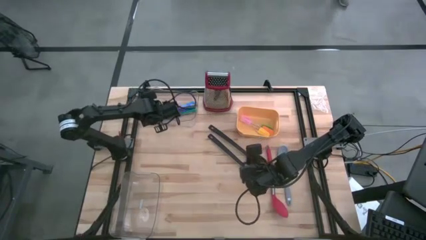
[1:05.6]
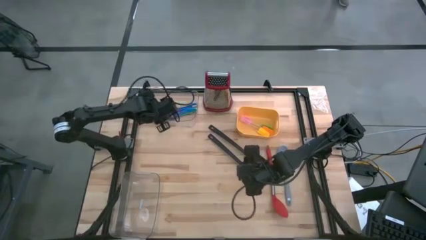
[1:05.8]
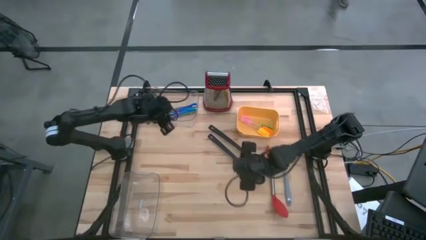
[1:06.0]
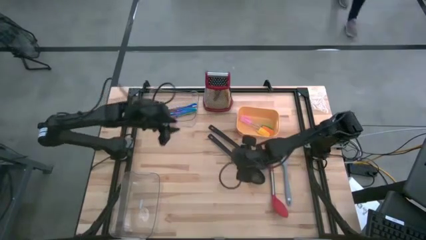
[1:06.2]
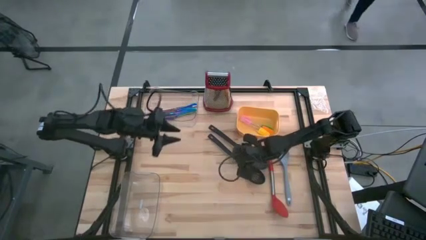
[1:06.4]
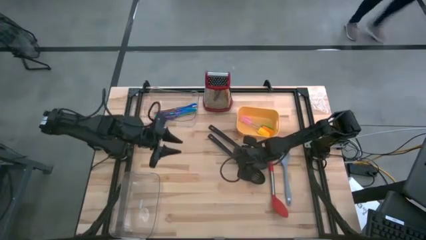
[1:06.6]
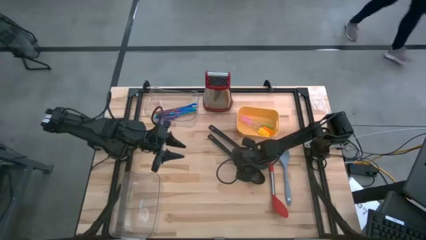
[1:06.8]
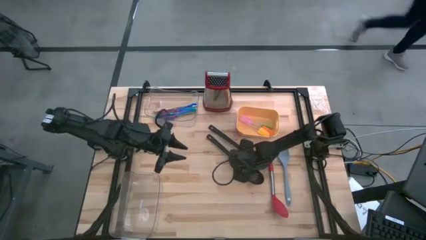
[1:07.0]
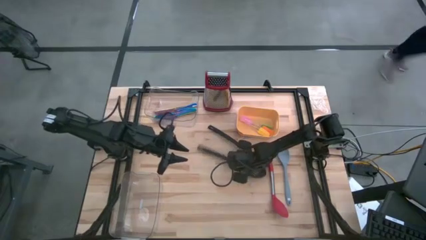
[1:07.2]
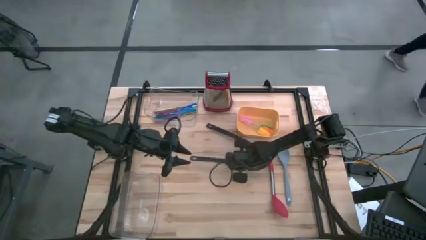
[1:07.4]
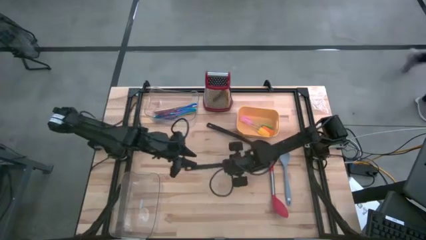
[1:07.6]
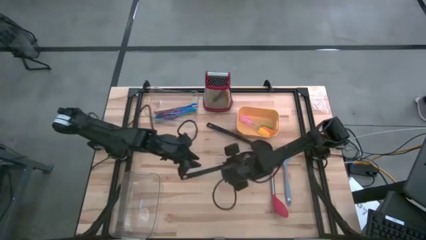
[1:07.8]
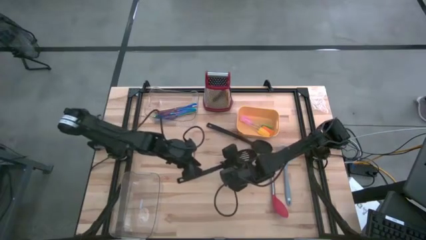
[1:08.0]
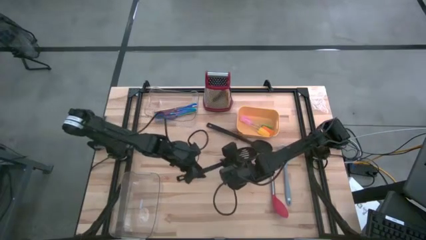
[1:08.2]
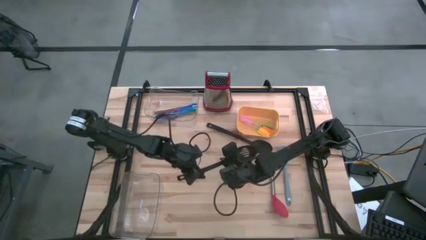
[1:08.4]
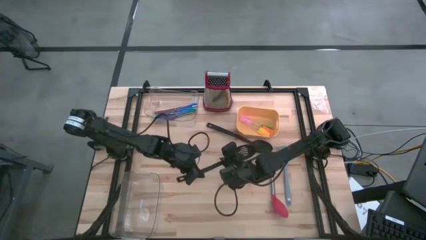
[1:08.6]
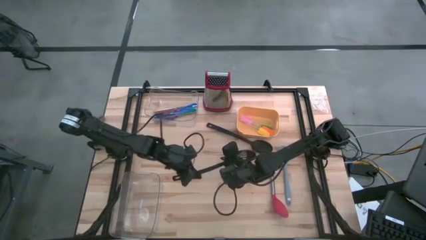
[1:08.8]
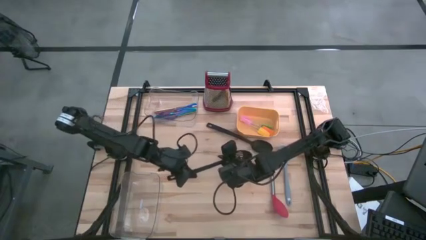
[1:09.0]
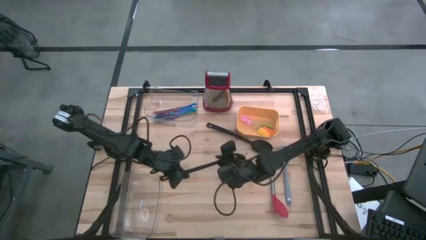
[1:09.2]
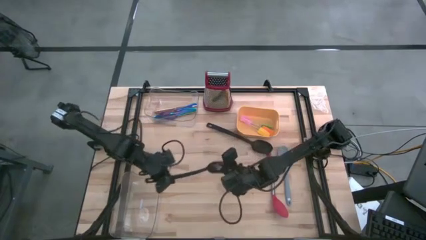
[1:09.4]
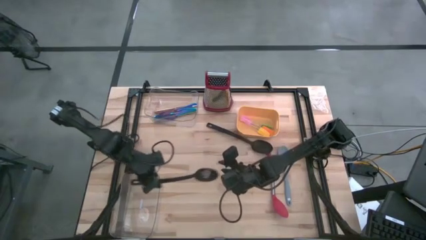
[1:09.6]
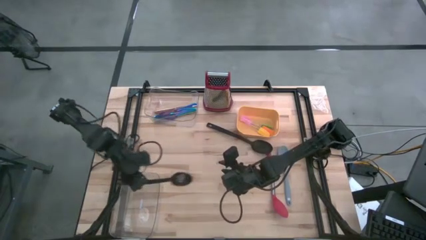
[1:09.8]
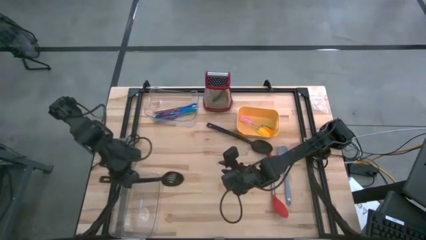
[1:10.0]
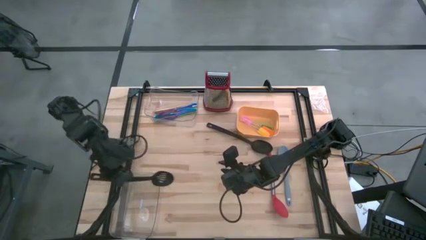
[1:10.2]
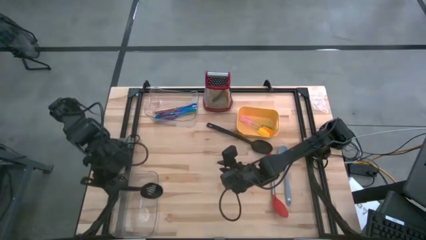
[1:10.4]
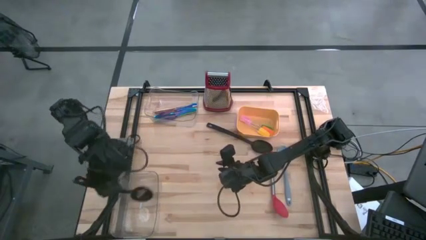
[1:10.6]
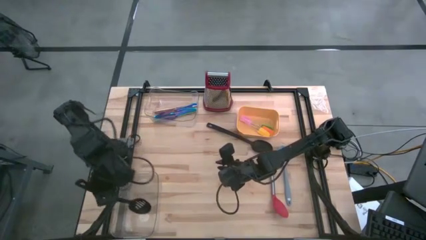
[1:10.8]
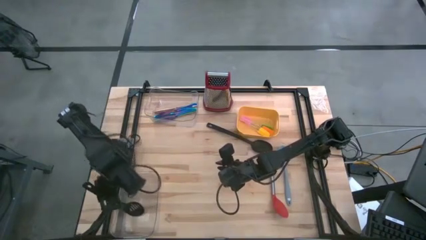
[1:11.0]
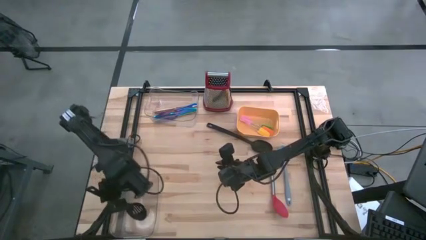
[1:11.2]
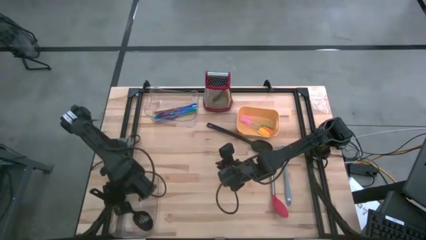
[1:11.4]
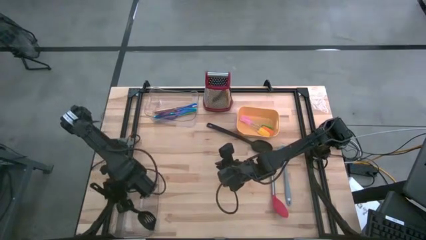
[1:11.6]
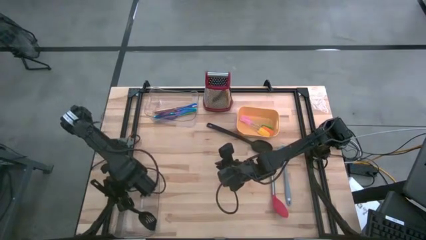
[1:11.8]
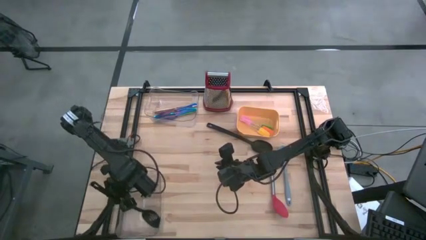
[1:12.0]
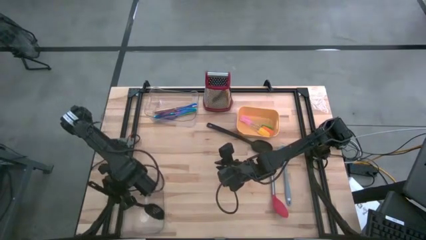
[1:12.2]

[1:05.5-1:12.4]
Task: Pick & Place Kitchen Items
Put the black slotted spoon into the bottom transparent bin

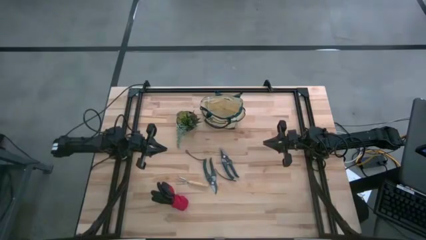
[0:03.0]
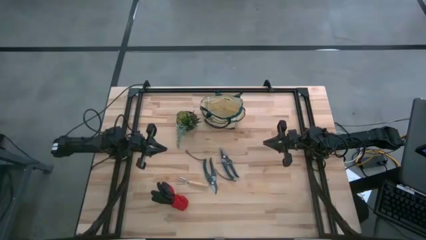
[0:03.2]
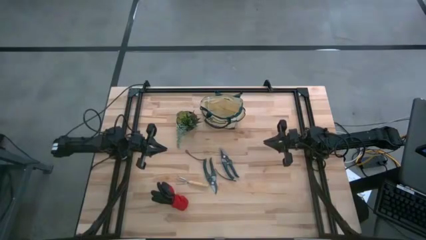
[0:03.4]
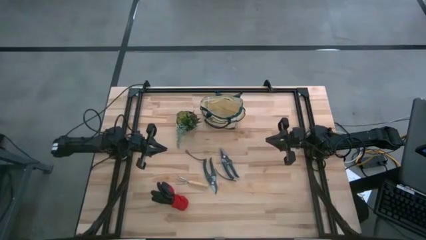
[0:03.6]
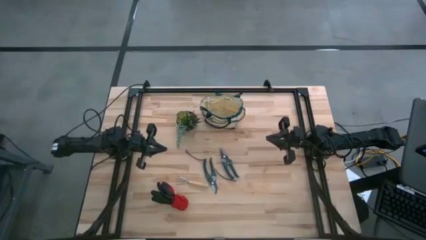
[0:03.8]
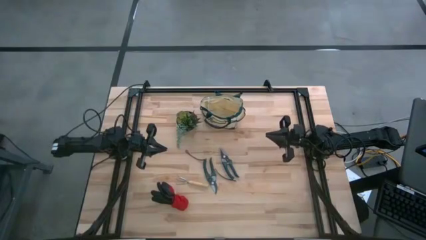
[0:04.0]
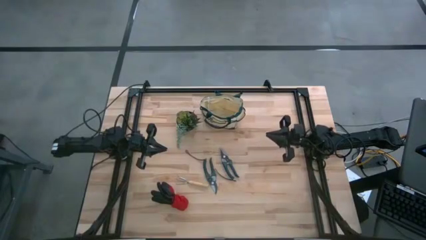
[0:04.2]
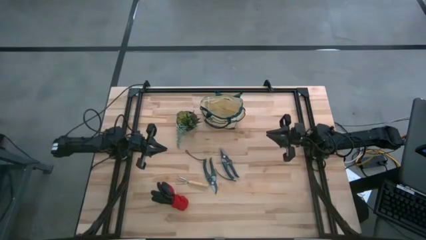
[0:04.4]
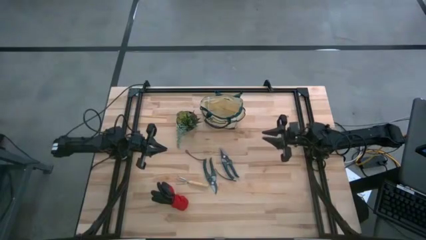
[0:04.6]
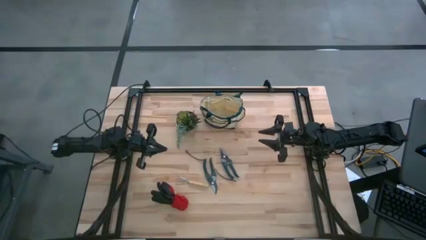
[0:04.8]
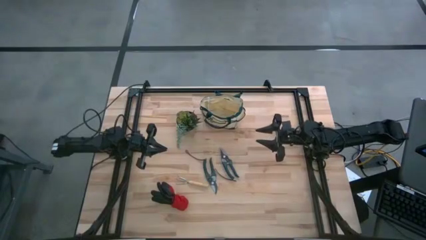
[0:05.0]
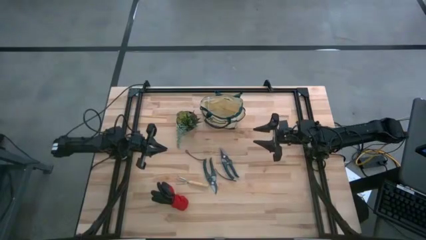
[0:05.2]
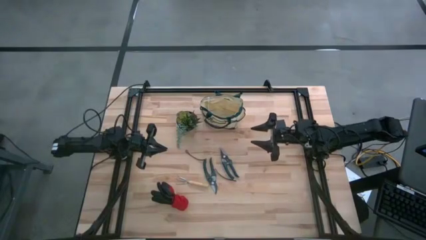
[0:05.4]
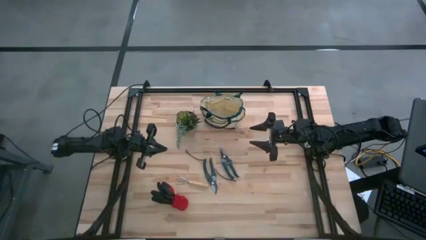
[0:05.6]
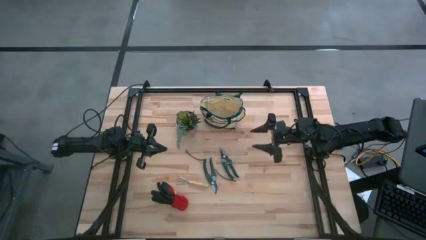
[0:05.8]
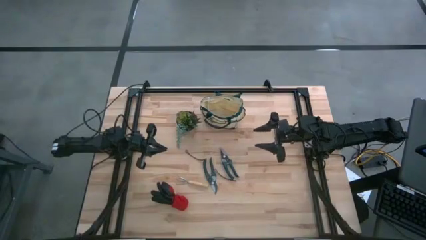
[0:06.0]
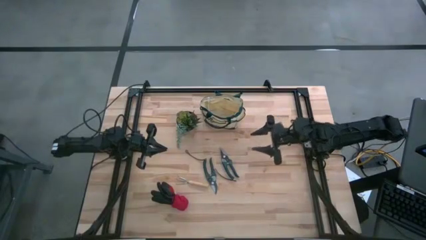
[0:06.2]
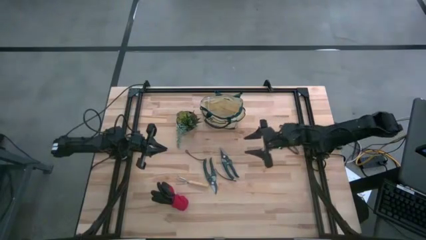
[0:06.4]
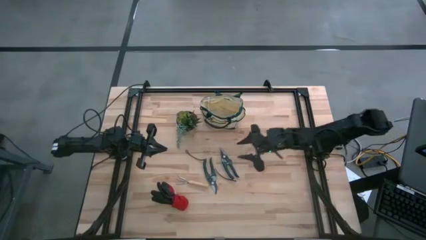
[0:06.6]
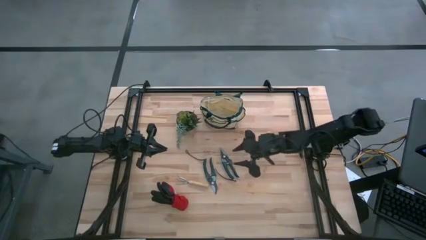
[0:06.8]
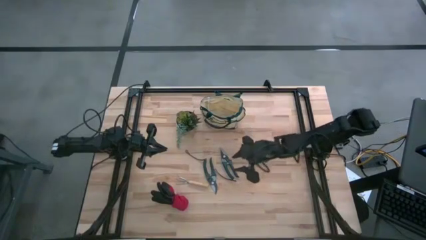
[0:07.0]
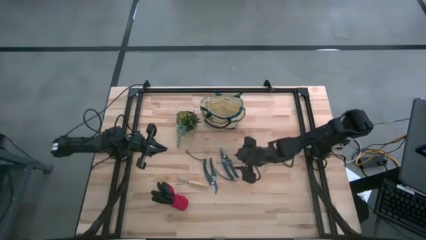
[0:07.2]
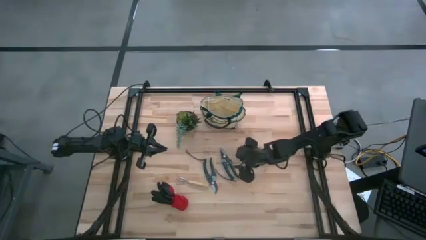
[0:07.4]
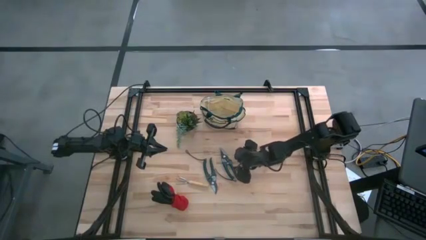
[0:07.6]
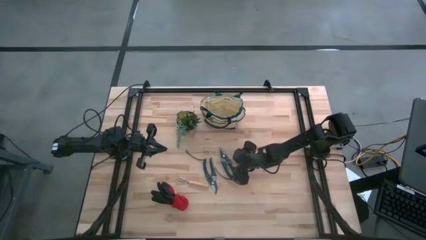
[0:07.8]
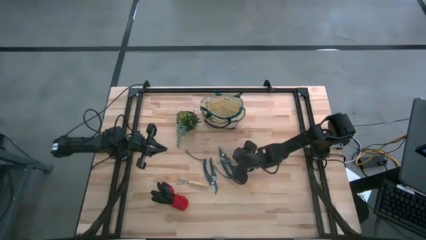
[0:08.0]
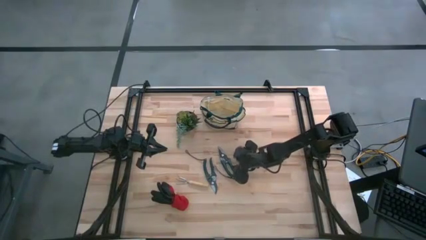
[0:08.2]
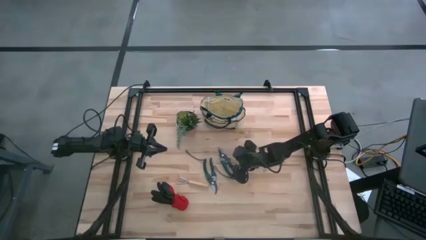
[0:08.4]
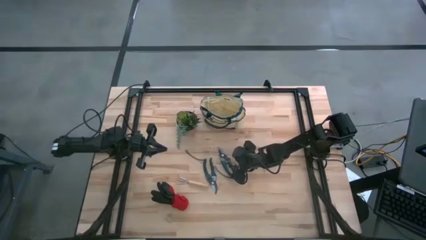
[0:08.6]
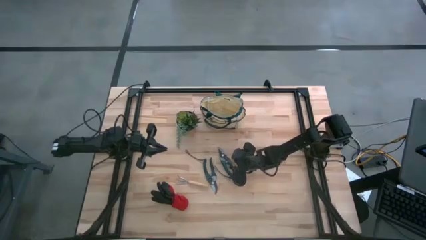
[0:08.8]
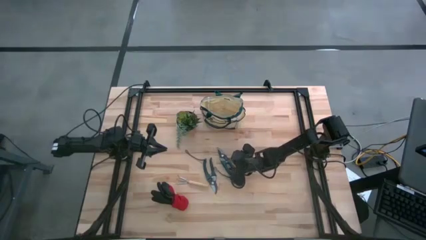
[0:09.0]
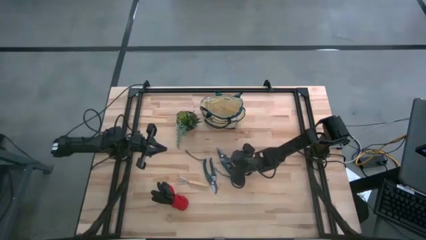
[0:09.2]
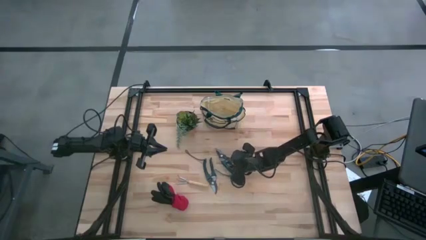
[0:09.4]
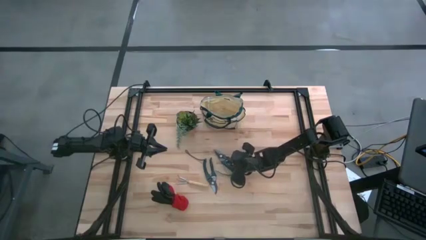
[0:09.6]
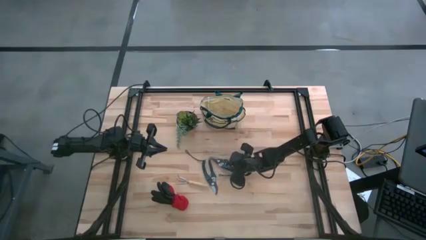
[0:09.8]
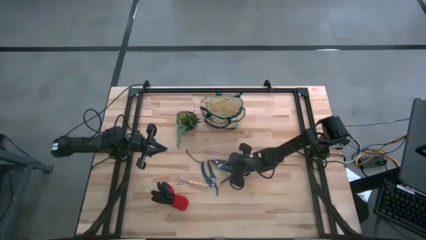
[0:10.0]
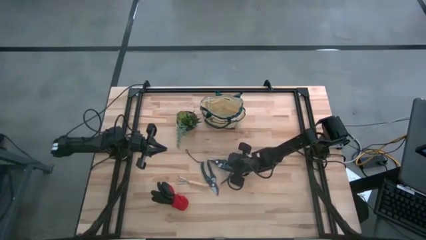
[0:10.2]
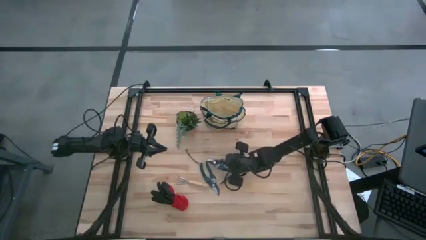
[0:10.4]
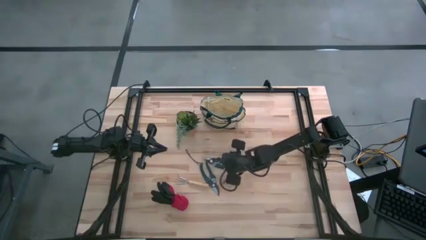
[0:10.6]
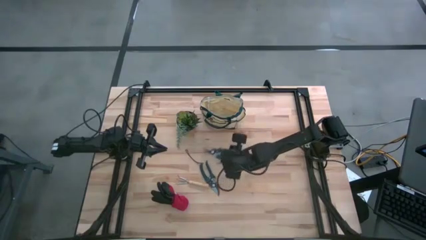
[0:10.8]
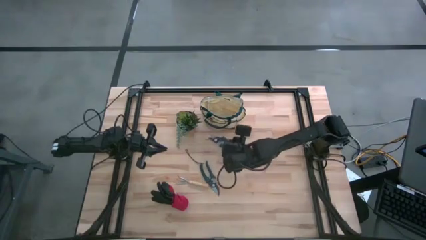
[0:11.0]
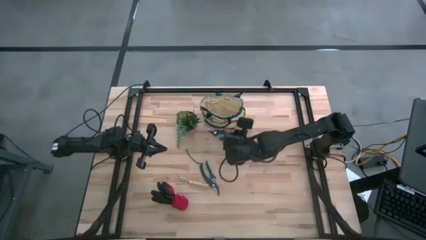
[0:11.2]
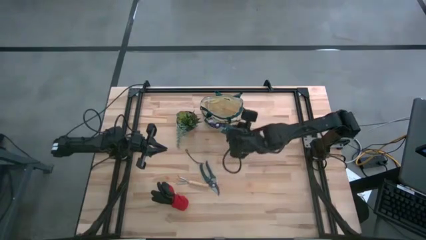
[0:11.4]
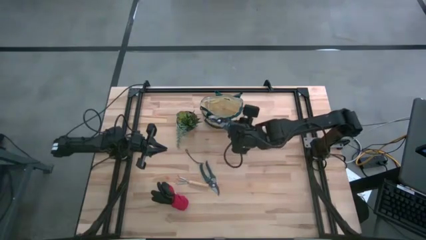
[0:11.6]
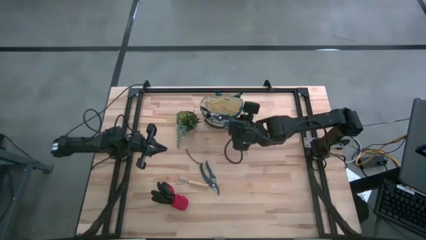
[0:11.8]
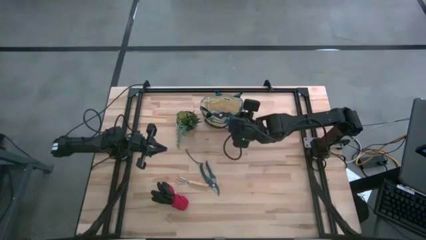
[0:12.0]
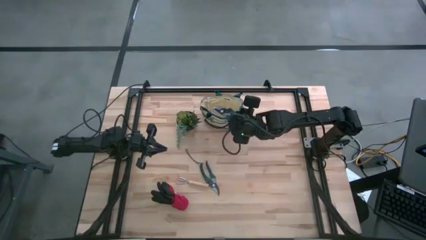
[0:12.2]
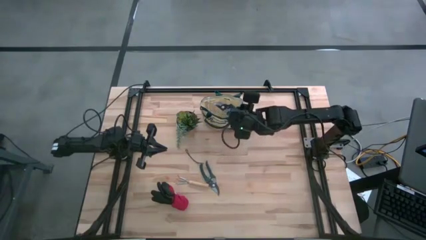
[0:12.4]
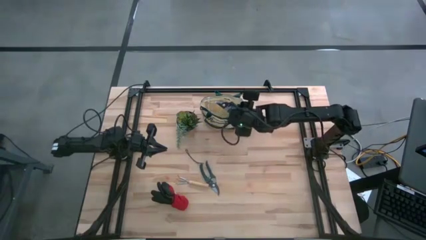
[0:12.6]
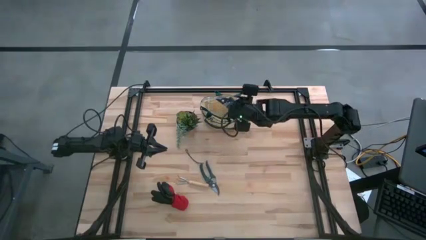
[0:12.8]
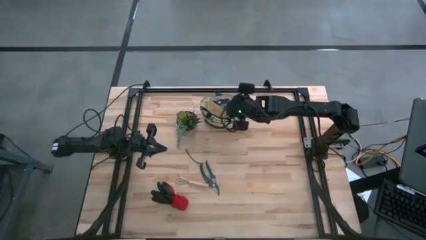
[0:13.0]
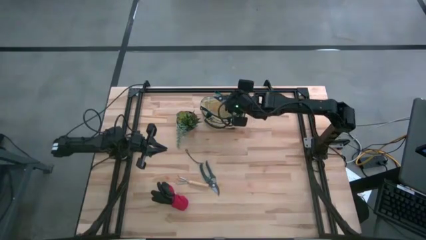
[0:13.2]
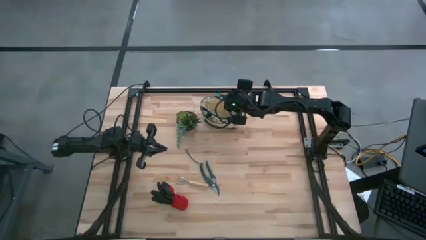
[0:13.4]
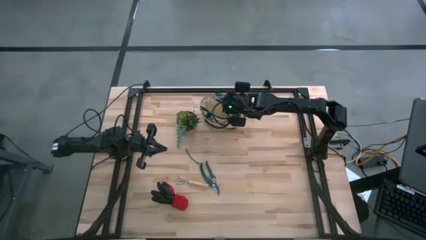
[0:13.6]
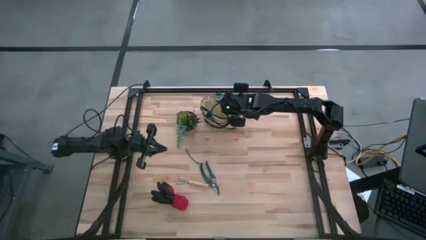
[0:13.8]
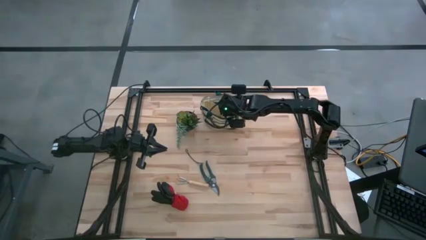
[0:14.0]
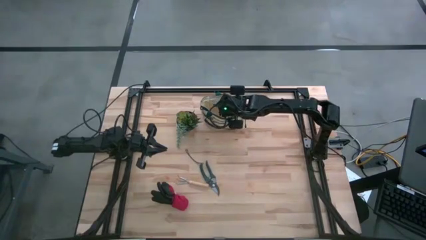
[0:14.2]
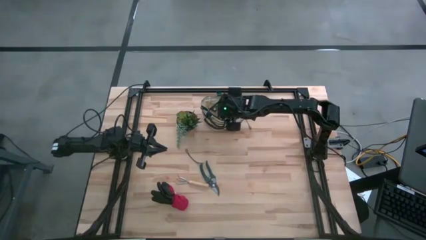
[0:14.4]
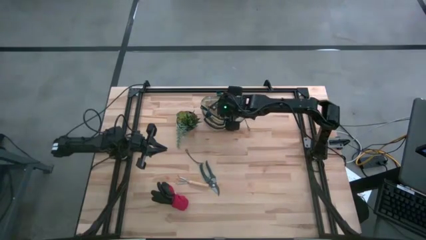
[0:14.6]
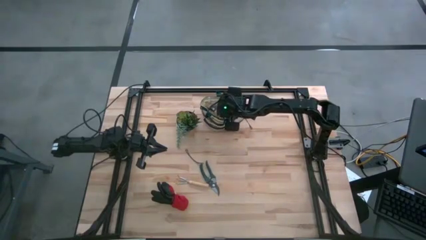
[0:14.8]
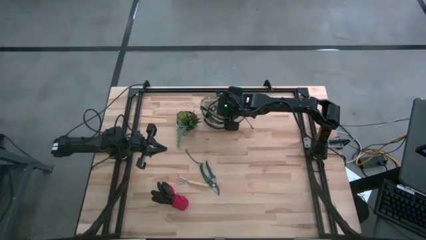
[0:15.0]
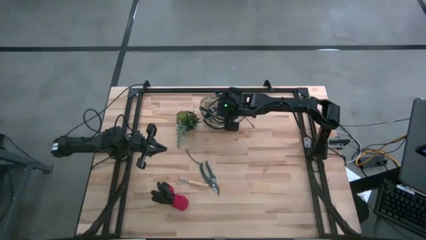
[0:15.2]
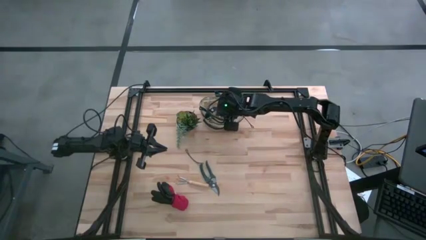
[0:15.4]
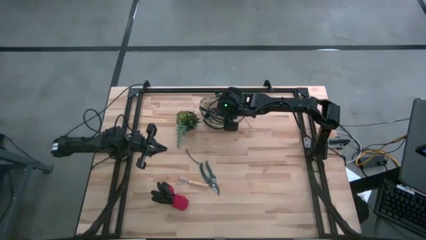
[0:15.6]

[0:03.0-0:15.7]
Task: Pick & Place Garden tools in Gardening bag
Put the right green shear scissors into the gardening bag
